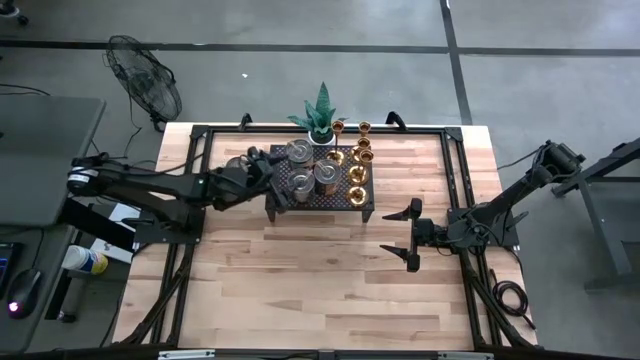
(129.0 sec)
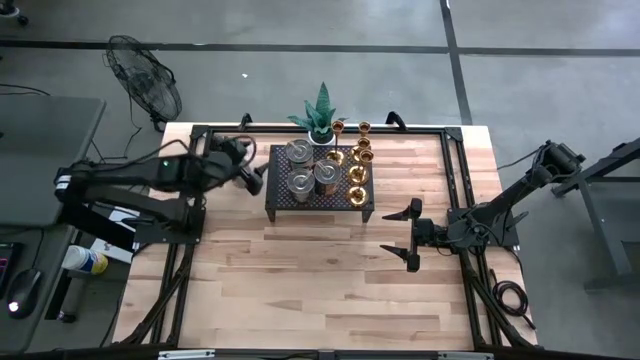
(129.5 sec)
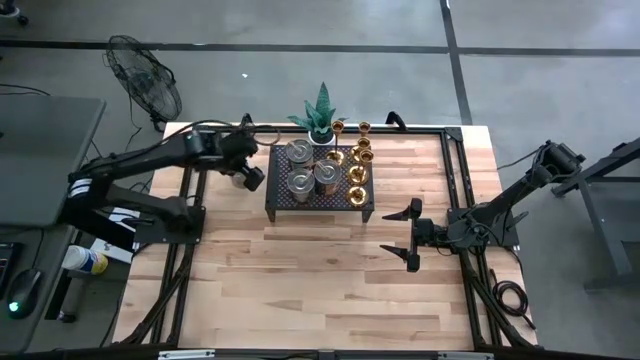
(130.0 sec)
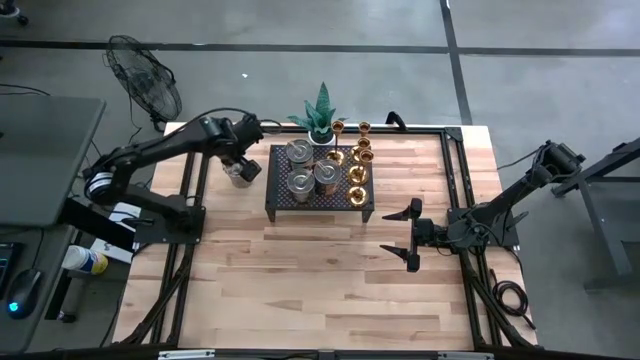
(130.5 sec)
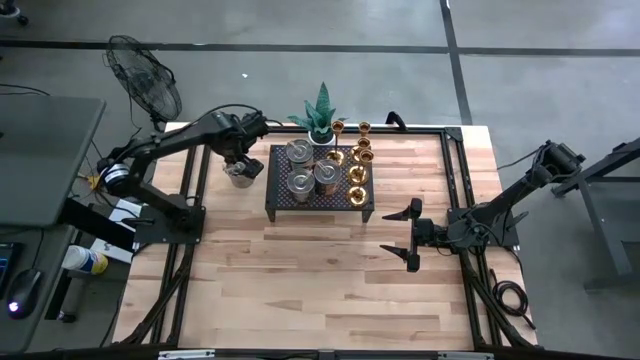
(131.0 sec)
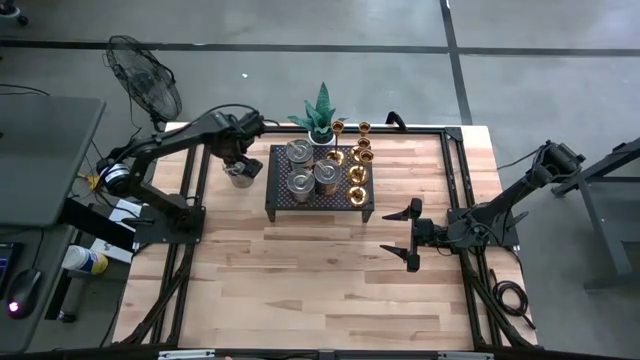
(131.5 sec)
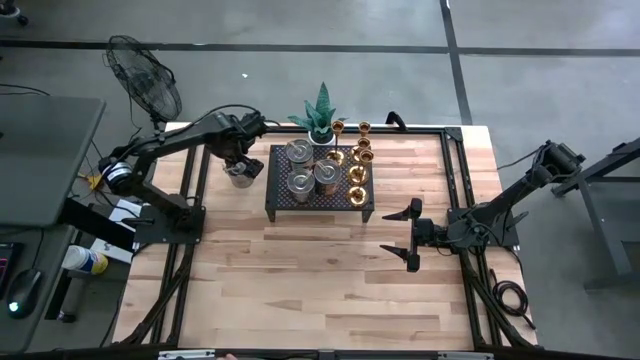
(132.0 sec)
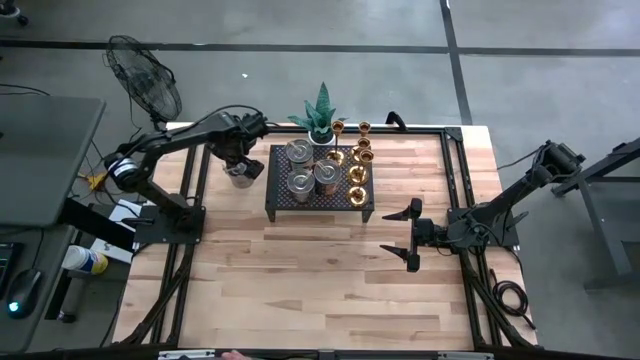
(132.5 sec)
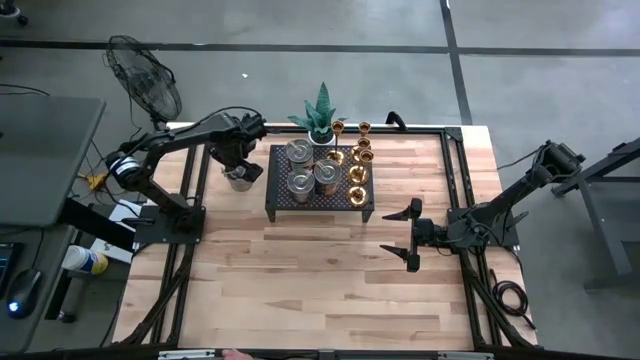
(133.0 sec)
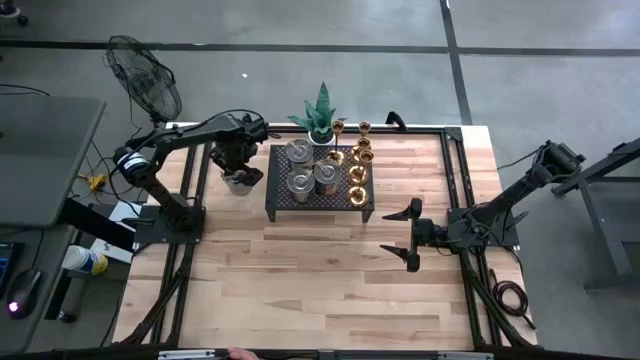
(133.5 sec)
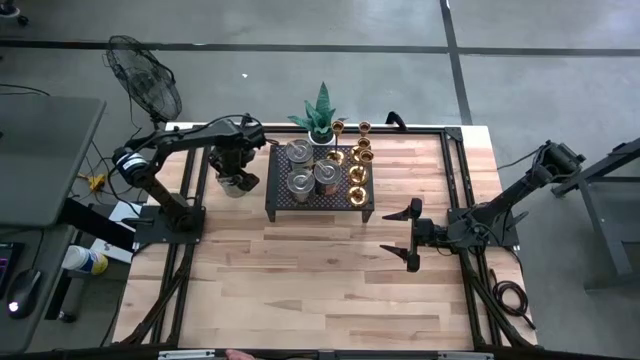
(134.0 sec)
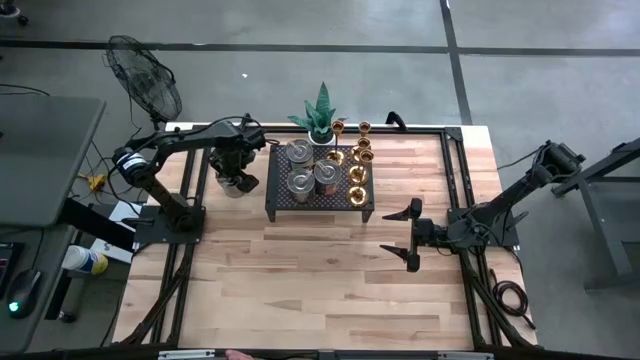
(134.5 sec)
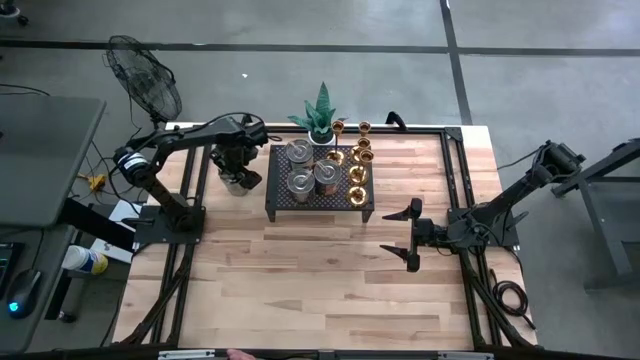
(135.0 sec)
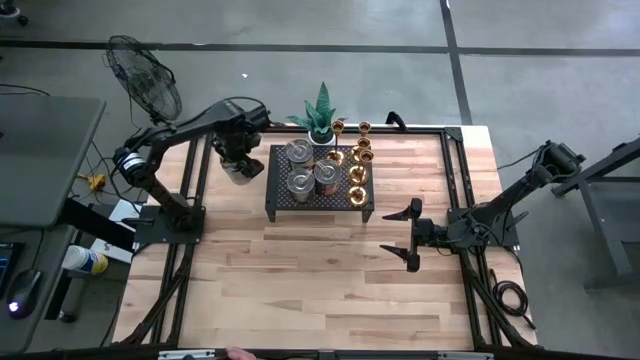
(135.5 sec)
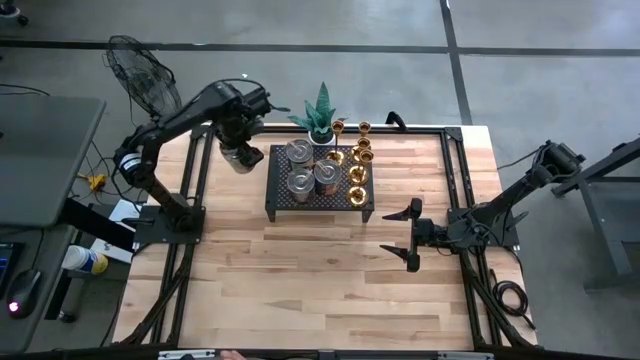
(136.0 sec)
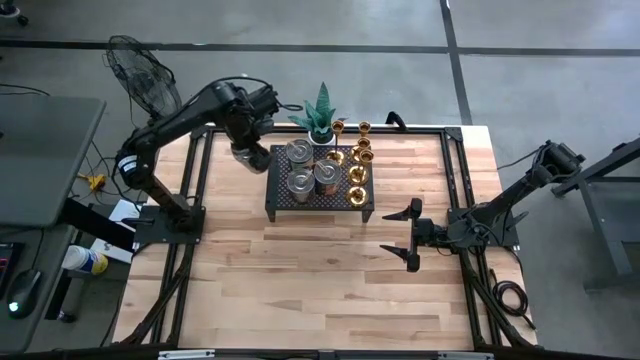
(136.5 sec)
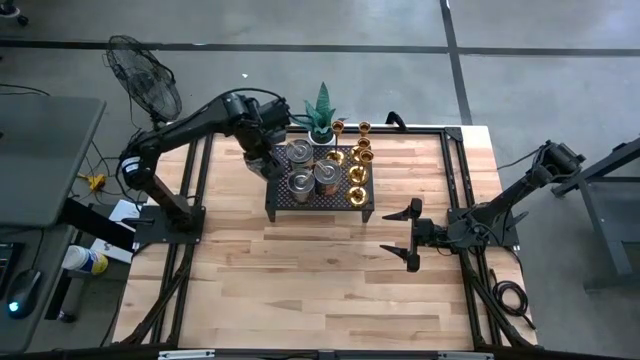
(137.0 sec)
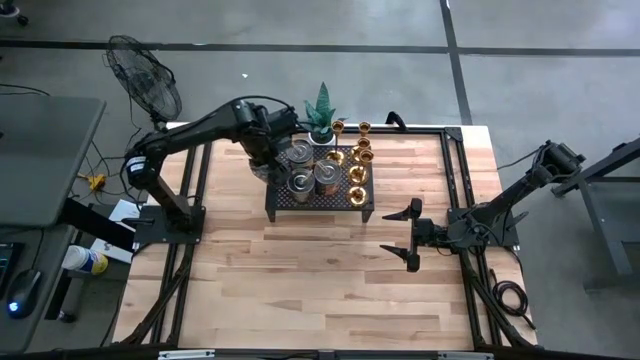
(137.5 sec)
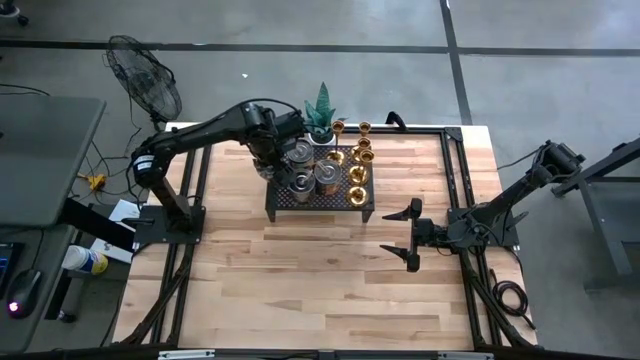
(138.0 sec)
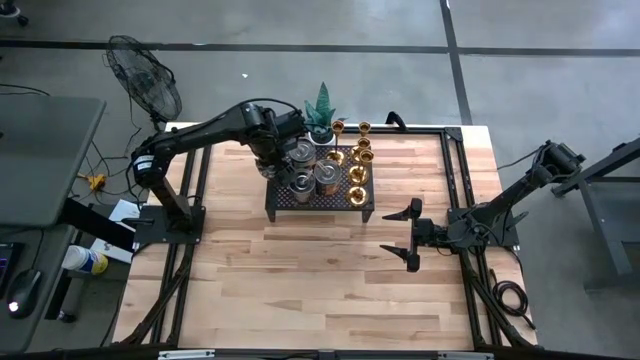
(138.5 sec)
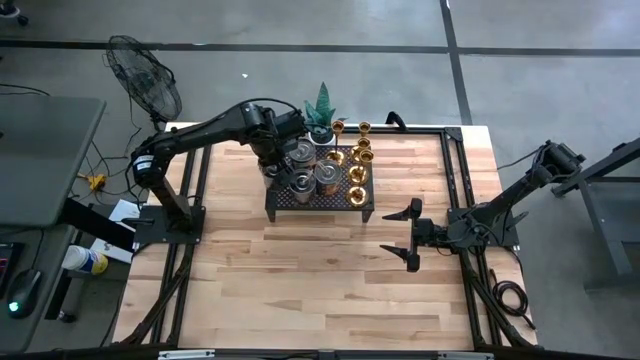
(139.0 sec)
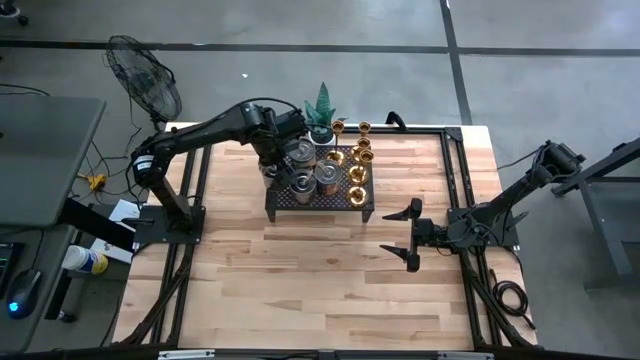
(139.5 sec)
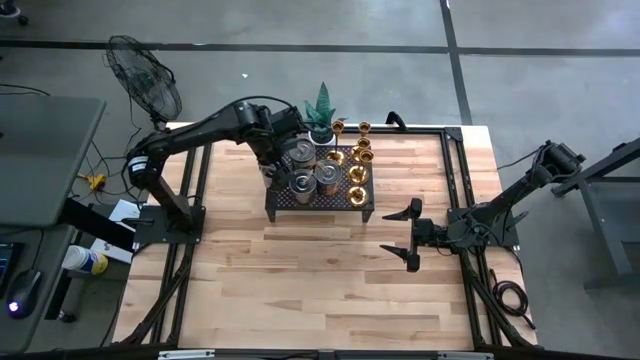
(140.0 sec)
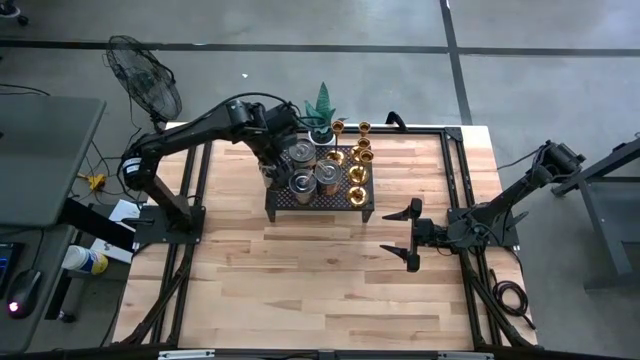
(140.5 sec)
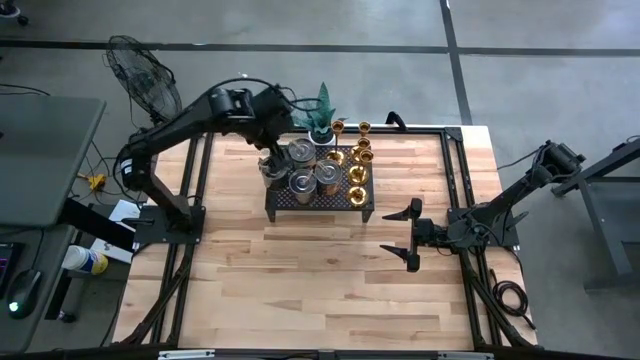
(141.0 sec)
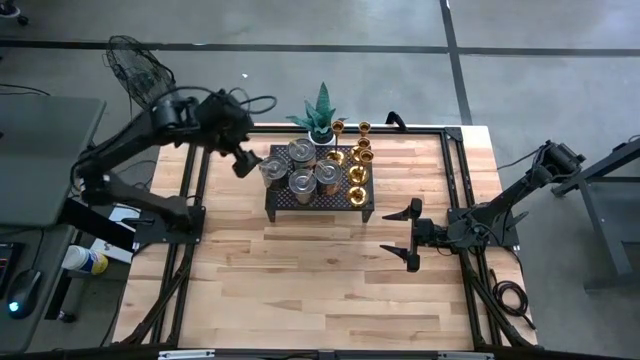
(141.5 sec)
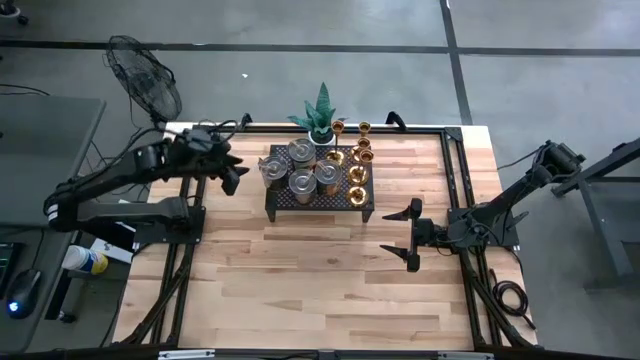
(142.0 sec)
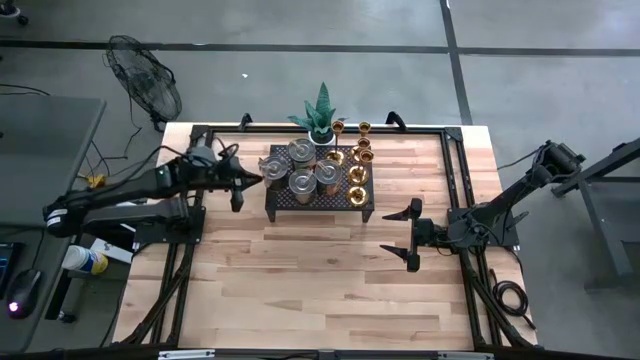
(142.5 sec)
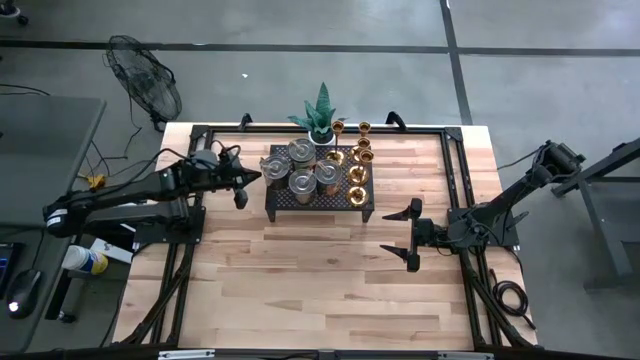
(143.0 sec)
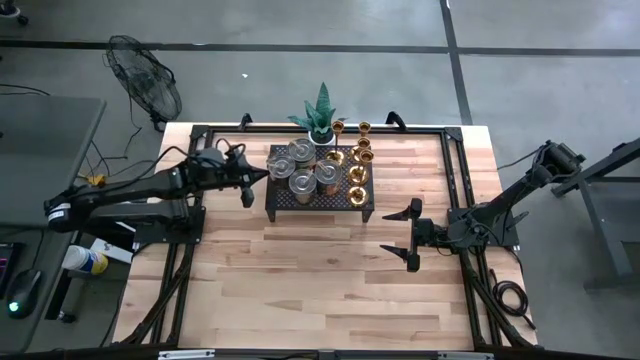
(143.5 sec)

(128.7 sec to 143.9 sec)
Task: Pick & Place candle stick holders
Put the silver scented candle on the shelf

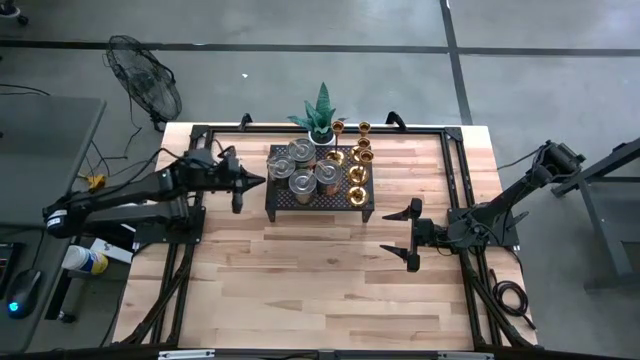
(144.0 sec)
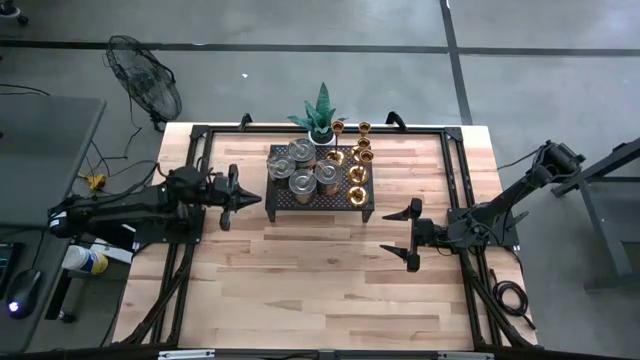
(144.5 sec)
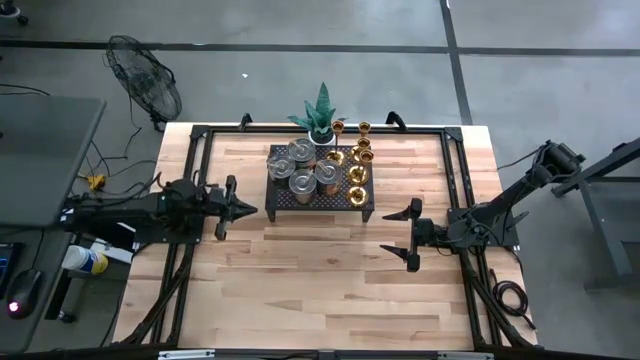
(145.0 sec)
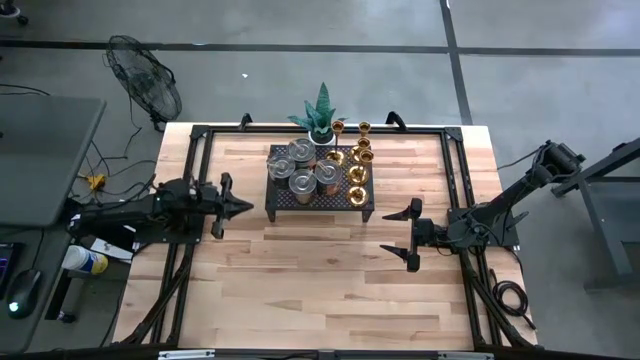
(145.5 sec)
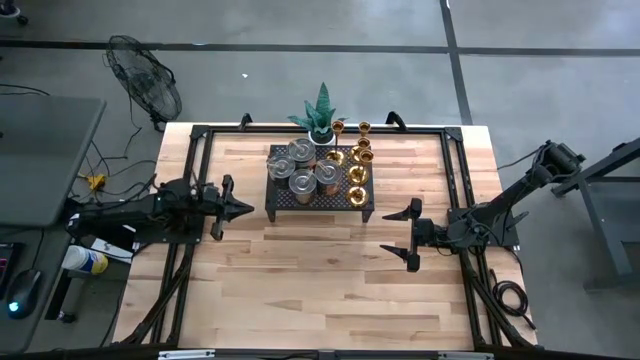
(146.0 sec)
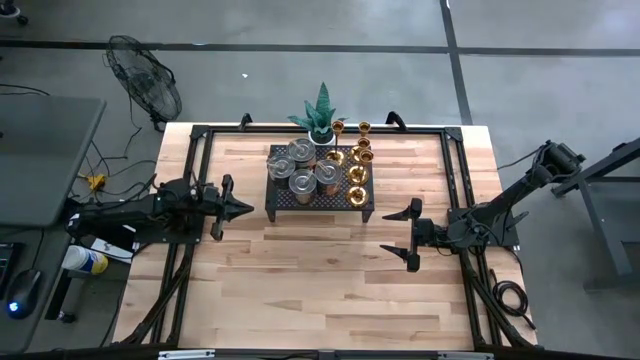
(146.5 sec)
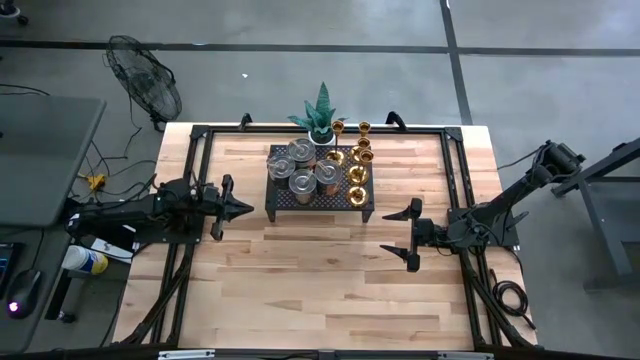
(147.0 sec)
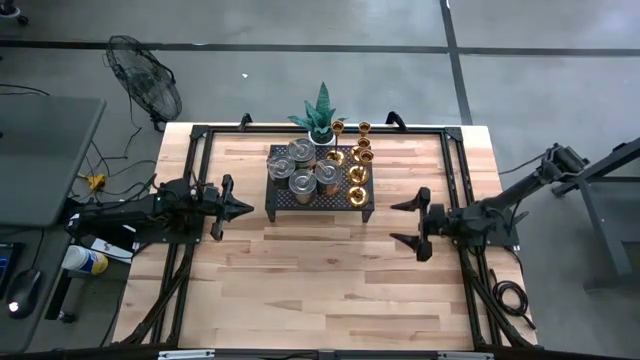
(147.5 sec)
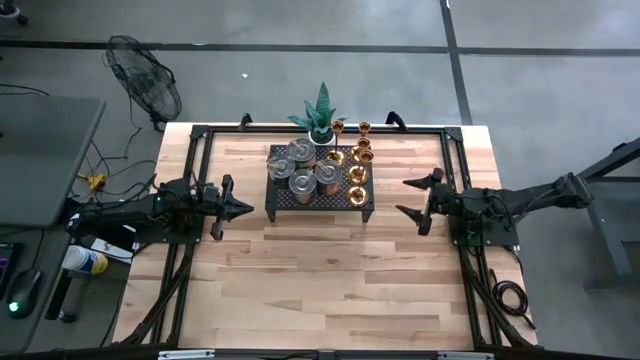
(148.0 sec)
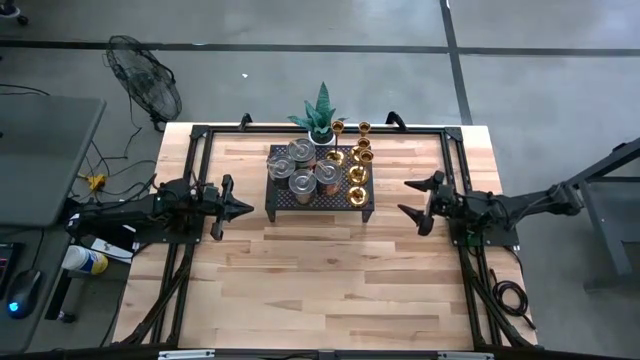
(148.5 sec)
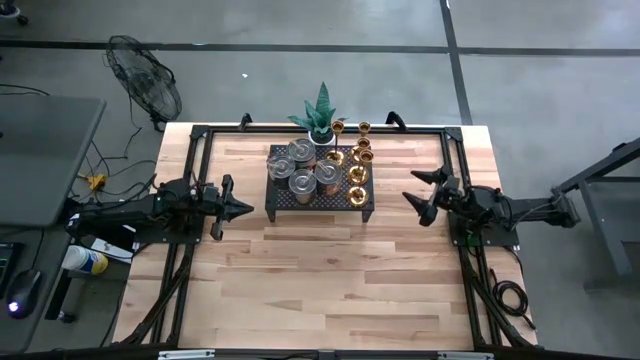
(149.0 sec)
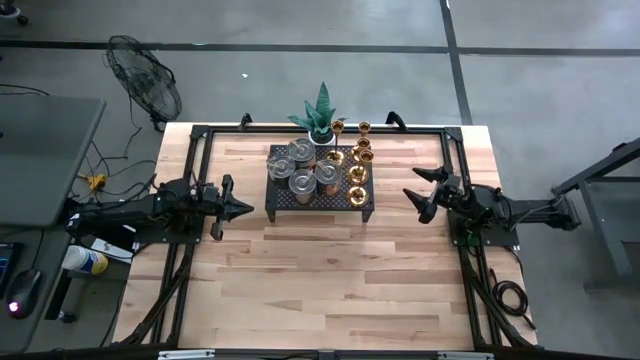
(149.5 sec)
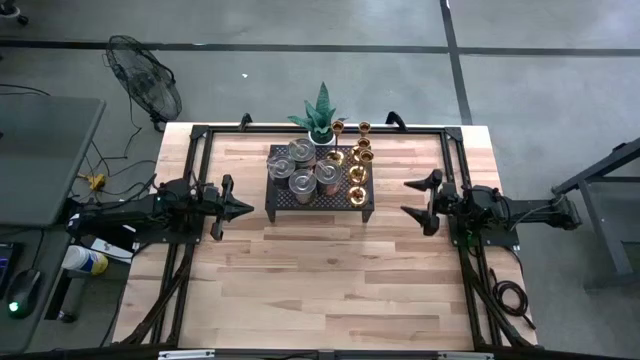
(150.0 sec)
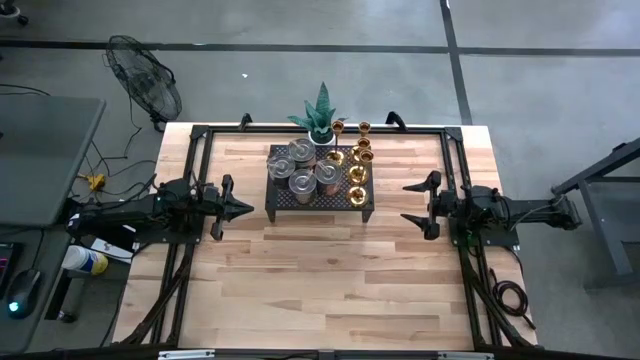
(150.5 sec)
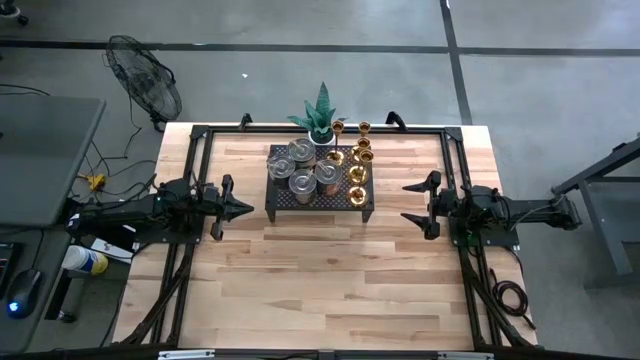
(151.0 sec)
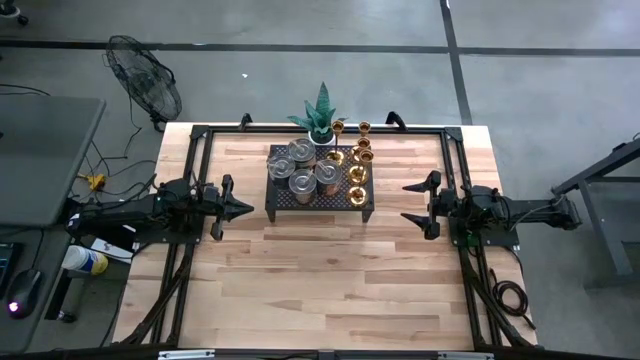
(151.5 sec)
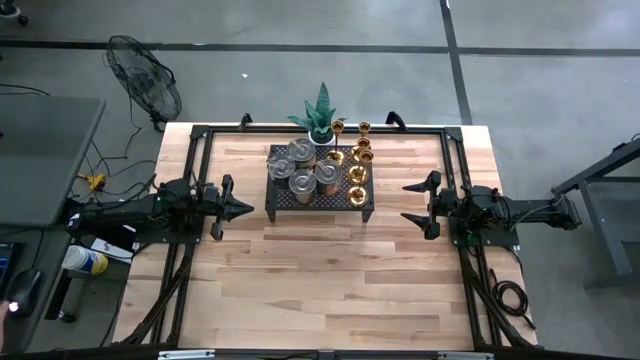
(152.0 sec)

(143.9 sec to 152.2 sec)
Return to Home Position
